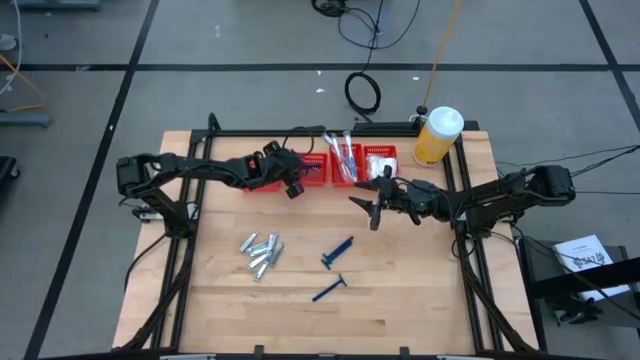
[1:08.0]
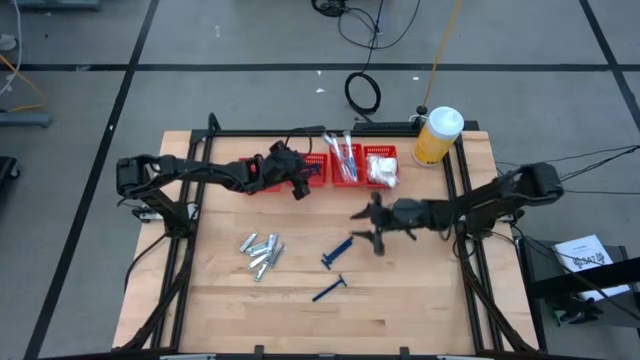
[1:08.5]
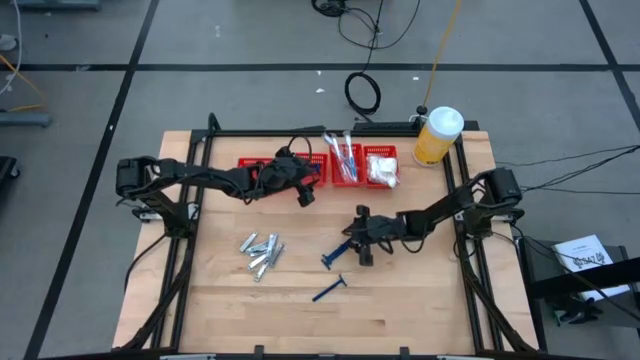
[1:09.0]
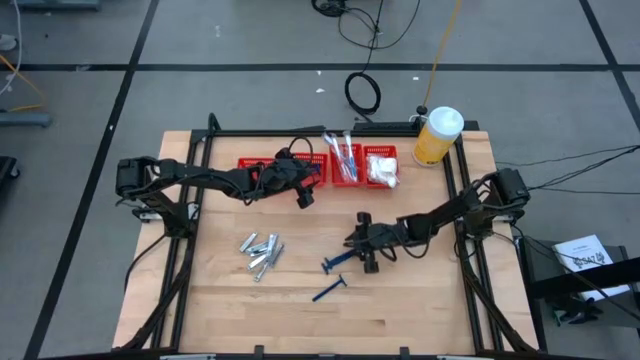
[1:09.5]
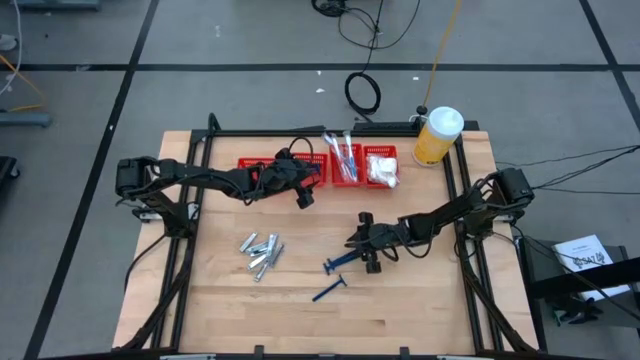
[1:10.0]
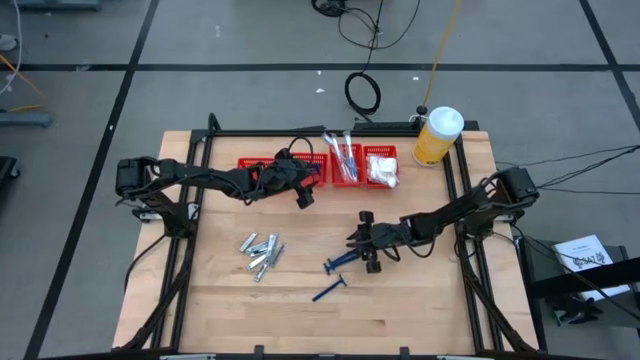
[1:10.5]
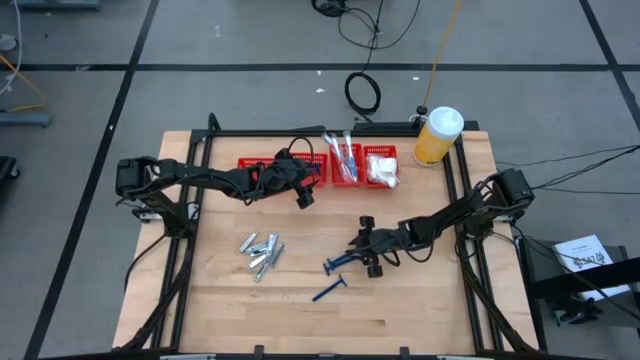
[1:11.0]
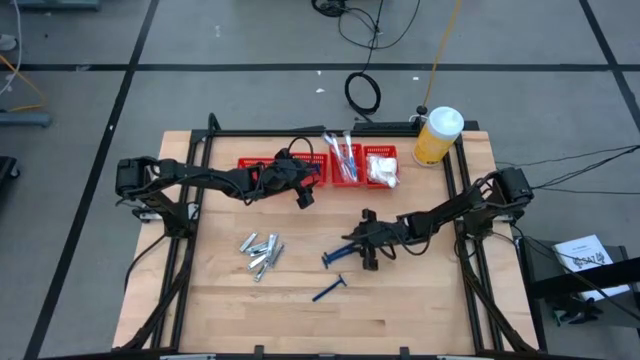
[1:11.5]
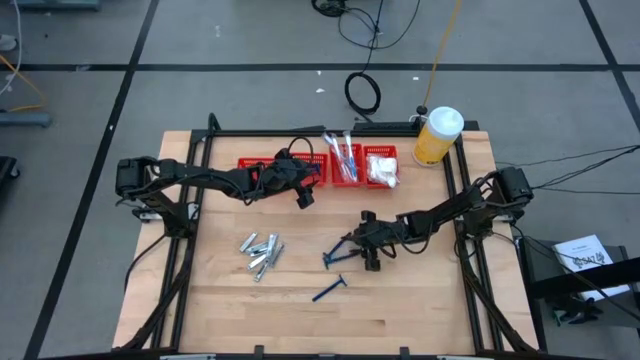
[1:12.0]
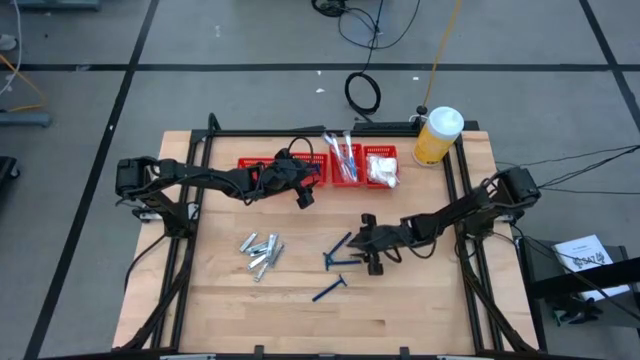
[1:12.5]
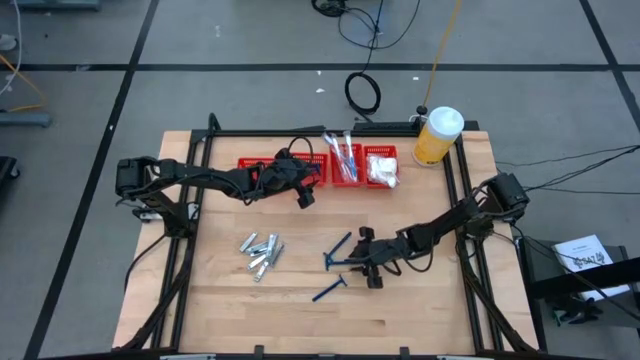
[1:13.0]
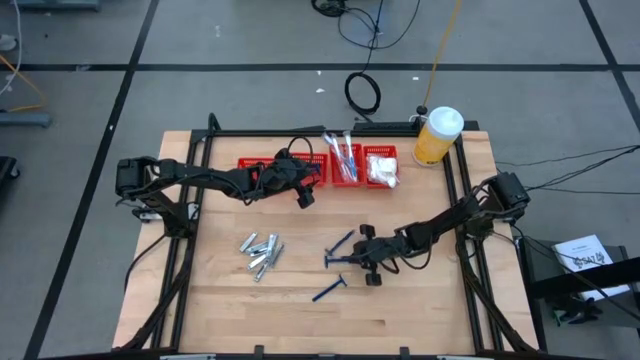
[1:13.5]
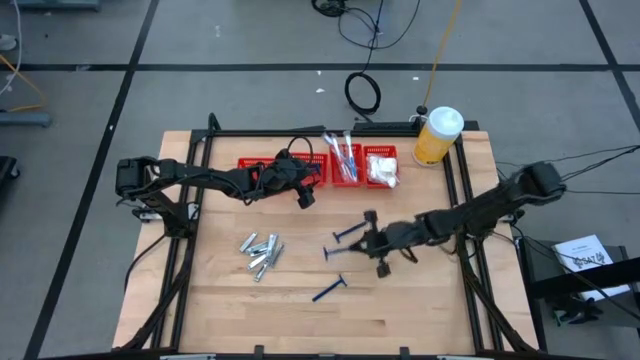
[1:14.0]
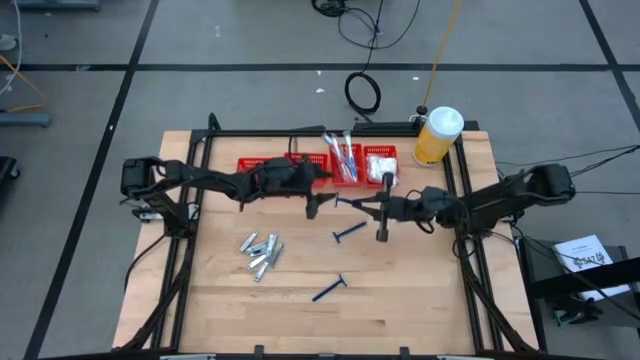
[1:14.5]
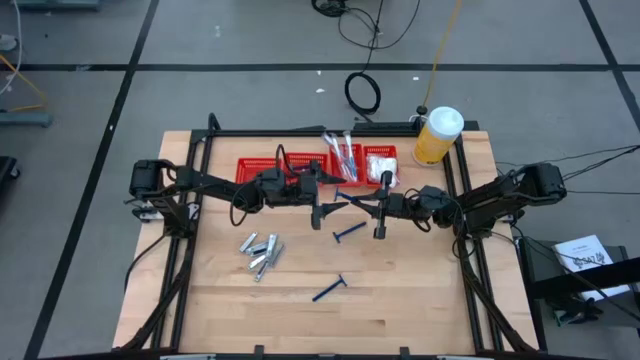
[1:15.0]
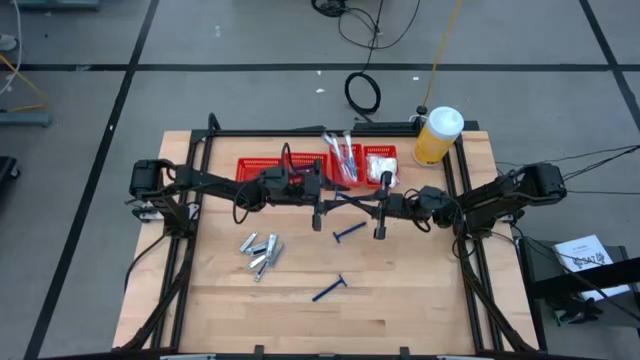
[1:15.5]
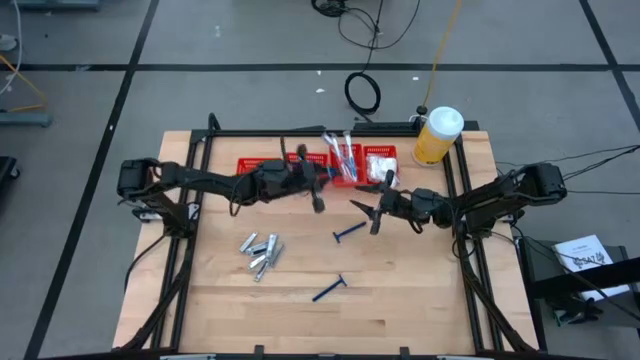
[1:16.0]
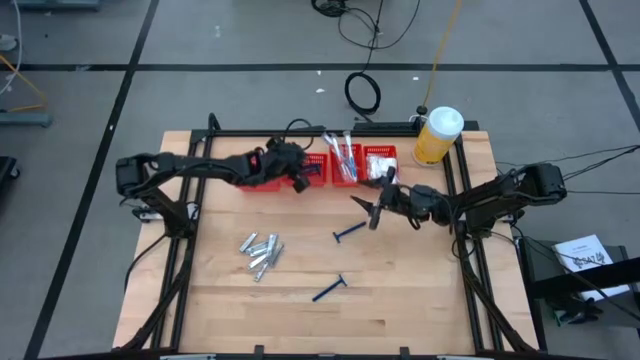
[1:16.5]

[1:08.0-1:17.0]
Task: Pick & Place Travel size toiletries
Put the middle razor into the horizontal right red bin

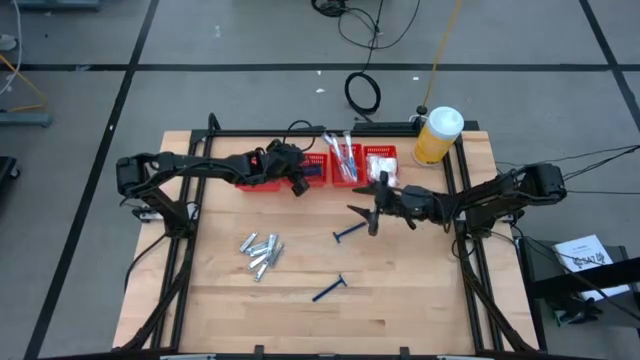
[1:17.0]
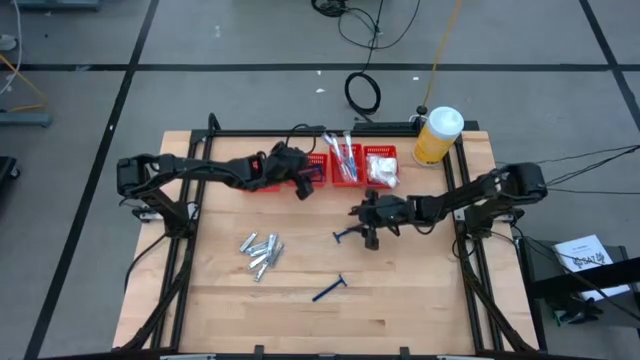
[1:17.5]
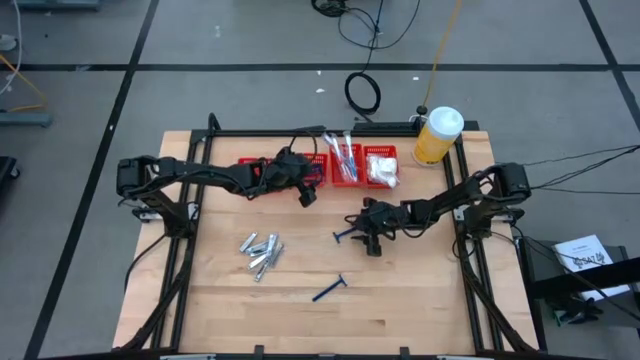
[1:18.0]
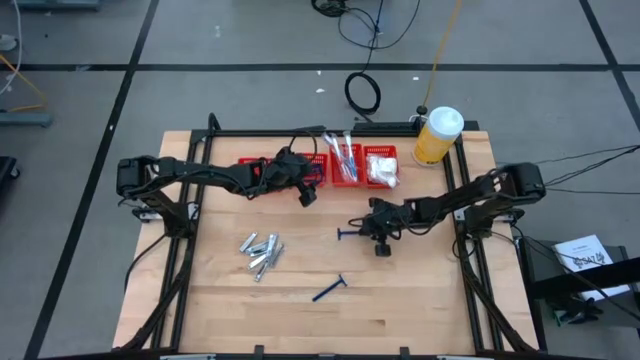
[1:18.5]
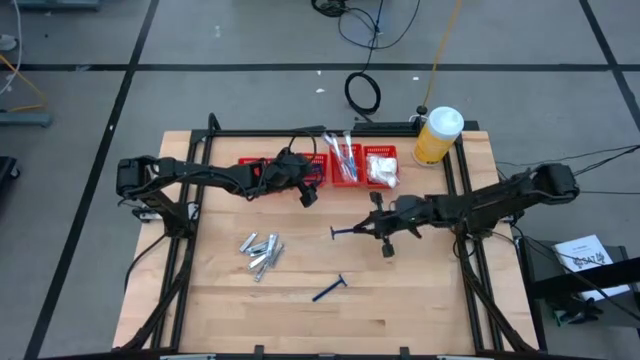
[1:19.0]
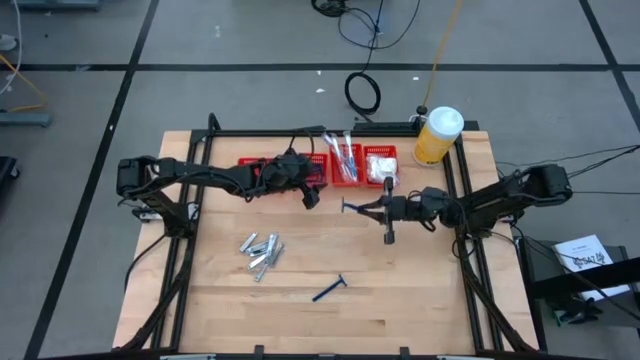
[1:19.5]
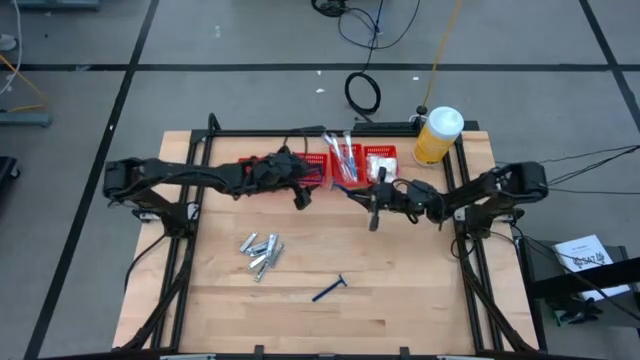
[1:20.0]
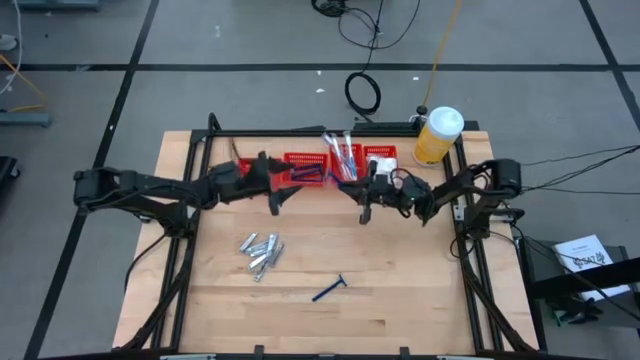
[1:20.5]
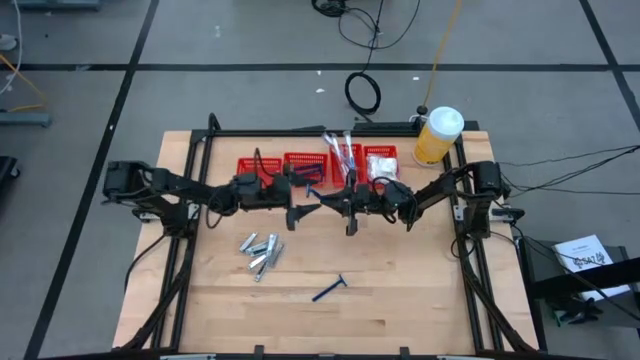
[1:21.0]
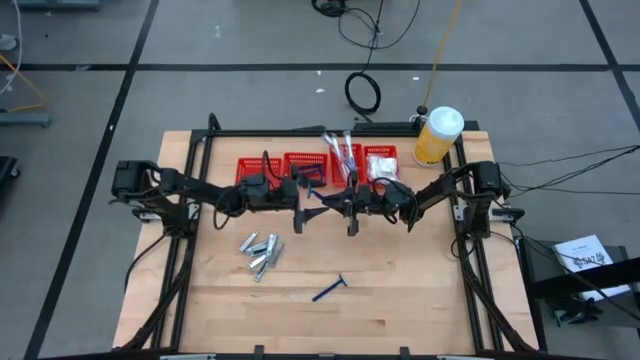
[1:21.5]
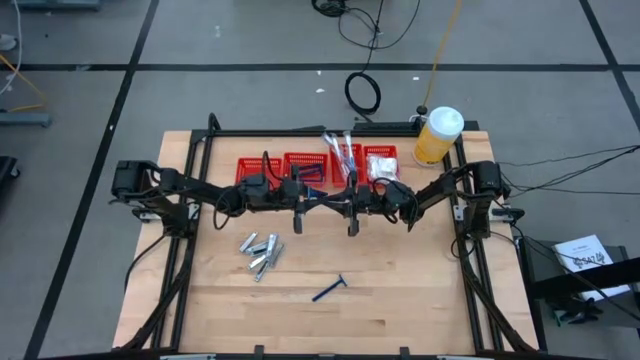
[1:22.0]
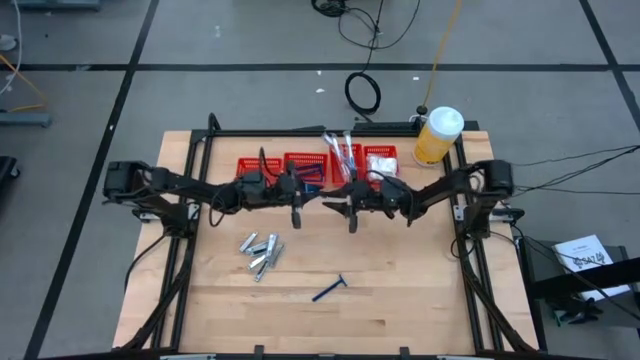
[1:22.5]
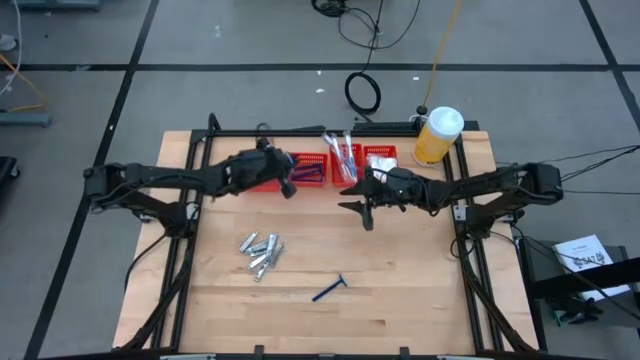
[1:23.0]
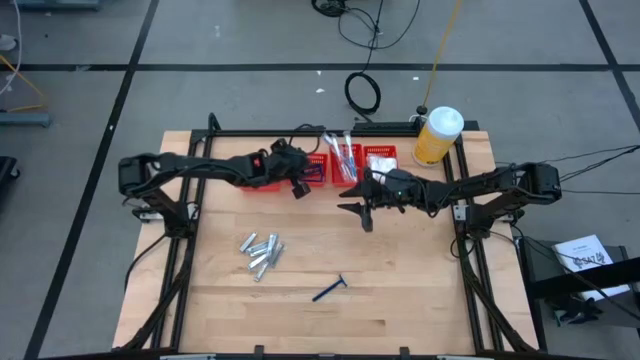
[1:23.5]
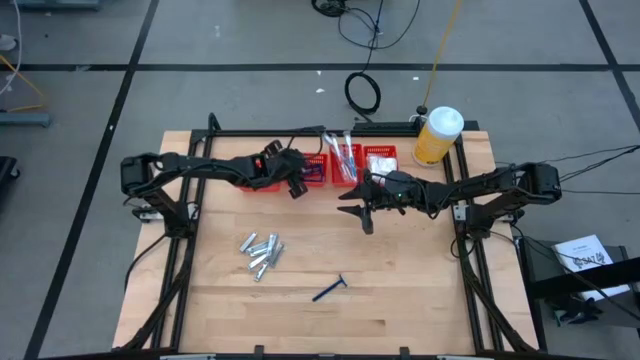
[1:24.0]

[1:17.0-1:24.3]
Put the top razor into the horizontal right red bin

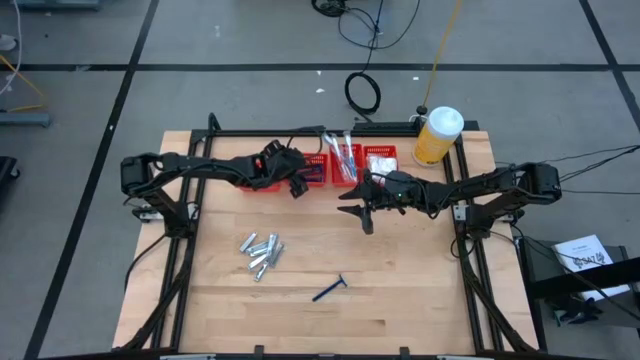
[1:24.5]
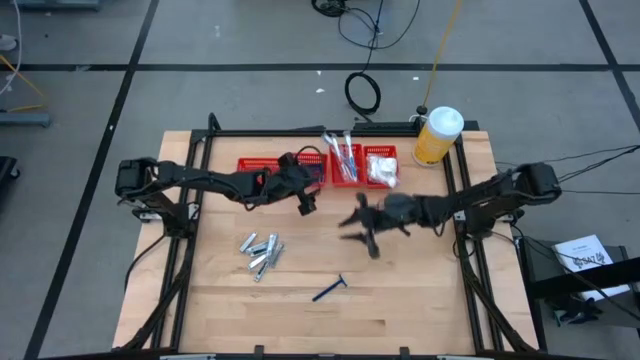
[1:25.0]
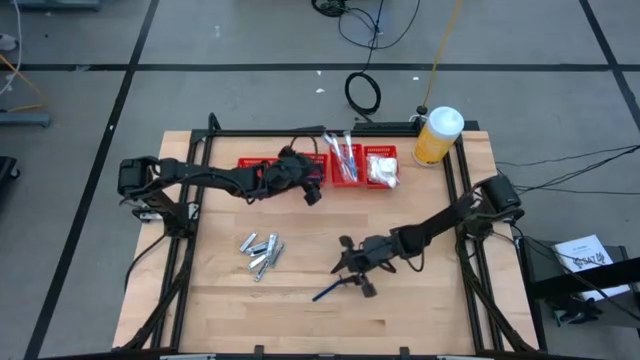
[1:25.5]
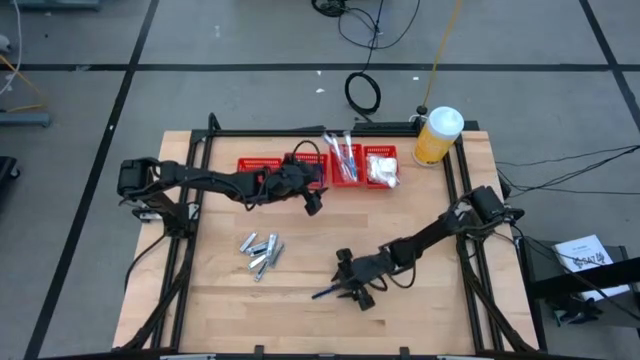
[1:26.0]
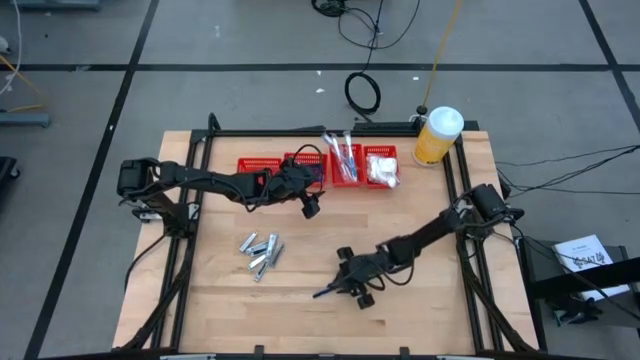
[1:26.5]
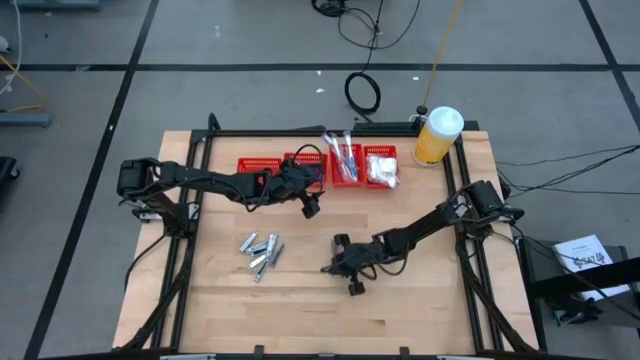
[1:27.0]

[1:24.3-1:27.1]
Put the razor into the horizontal right red bin

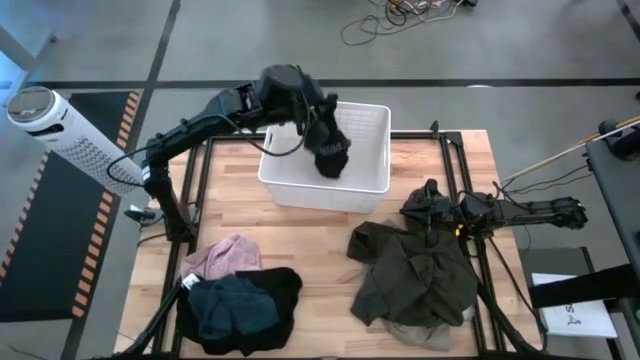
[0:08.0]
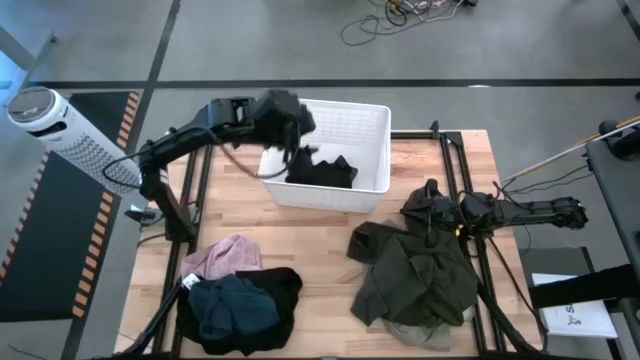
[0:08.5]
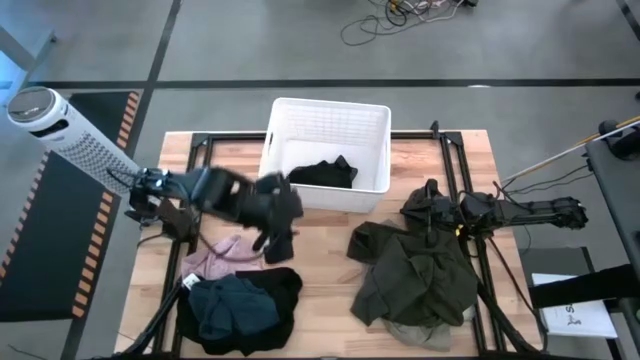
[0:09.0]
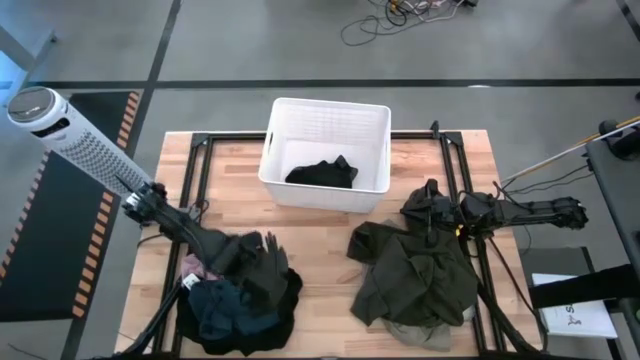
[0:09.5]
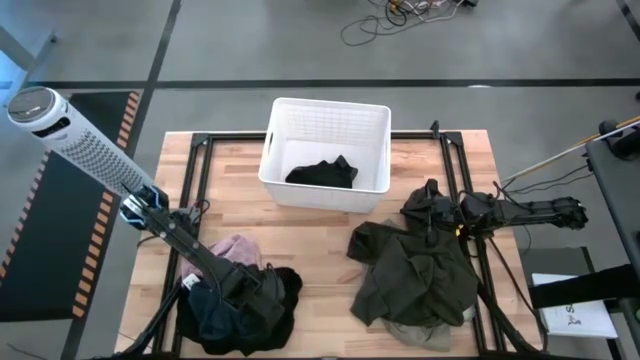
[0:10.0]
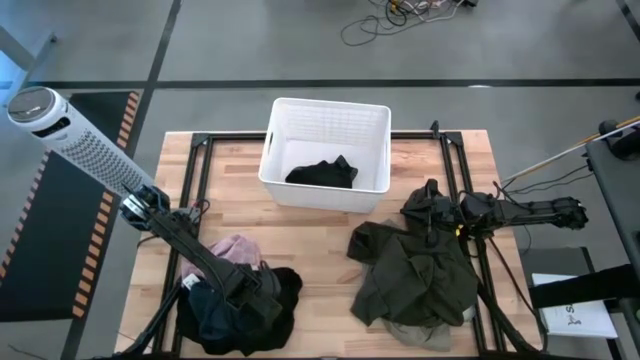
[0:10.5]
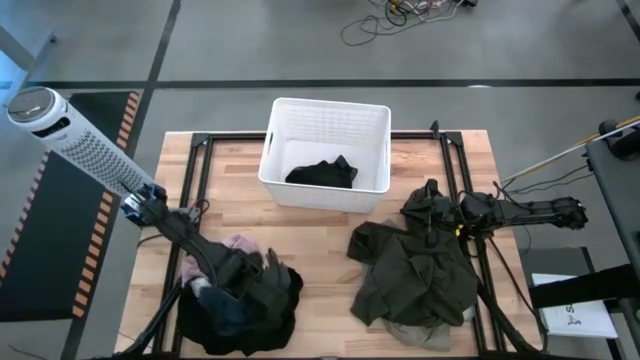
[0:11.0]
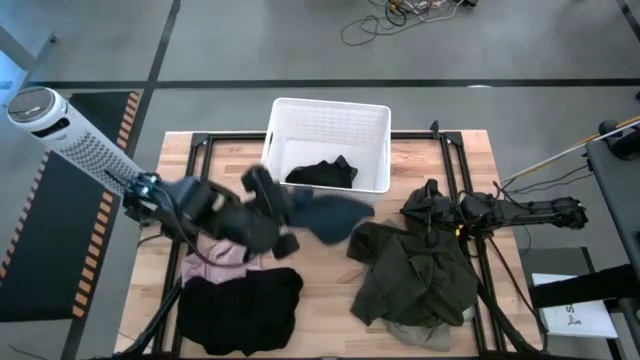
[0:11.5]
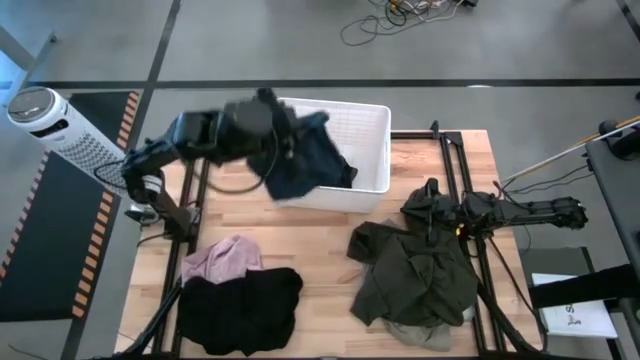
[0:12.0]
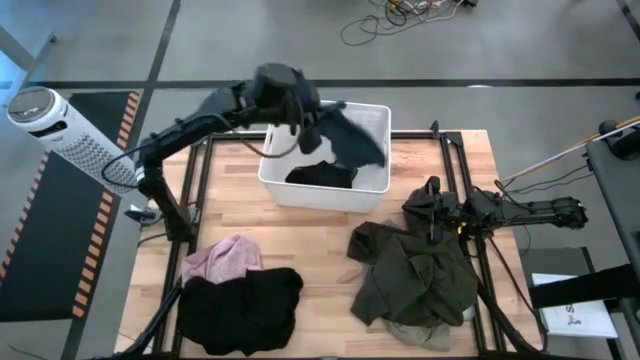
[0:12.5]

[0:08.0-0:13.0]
Task: Sort clothes
Put the blue underwear into the laundry bin
